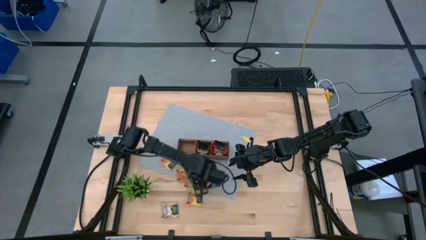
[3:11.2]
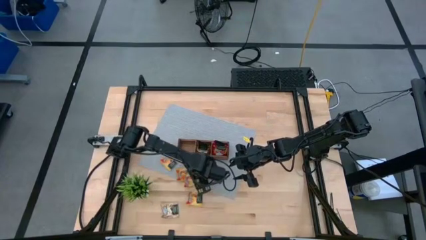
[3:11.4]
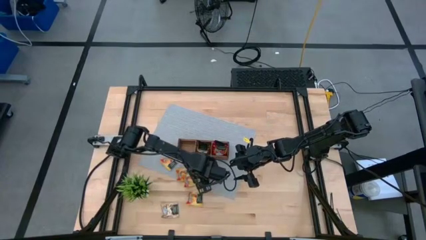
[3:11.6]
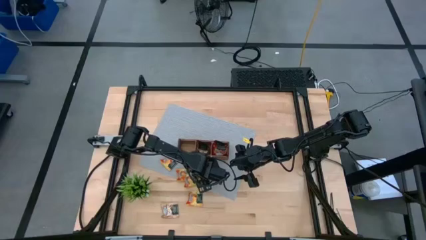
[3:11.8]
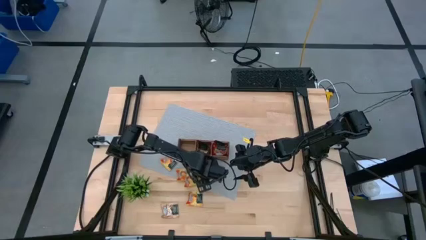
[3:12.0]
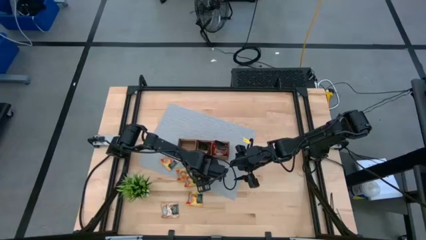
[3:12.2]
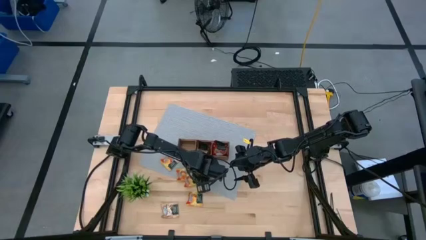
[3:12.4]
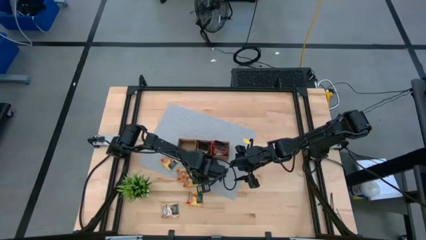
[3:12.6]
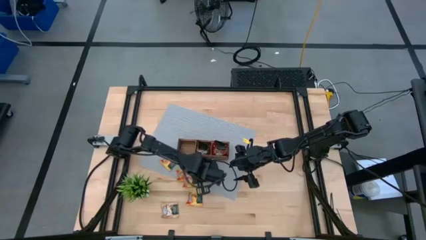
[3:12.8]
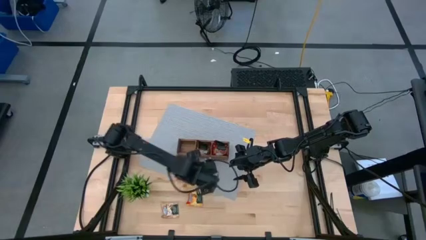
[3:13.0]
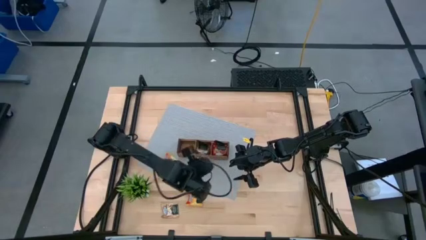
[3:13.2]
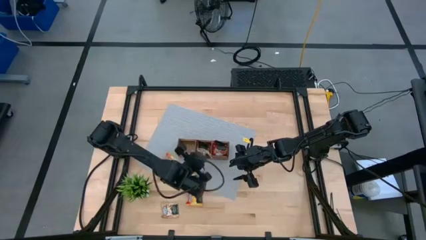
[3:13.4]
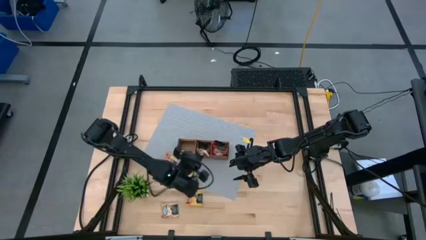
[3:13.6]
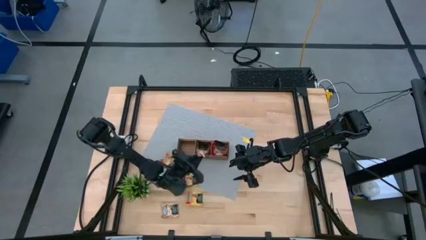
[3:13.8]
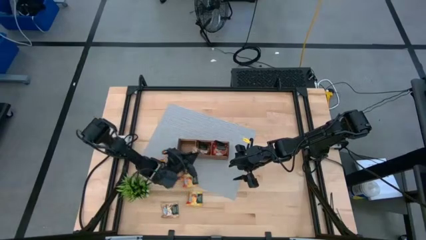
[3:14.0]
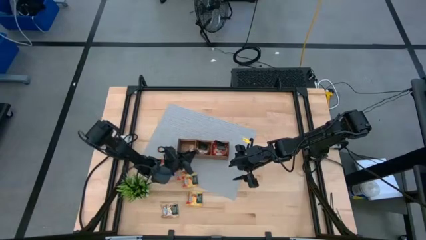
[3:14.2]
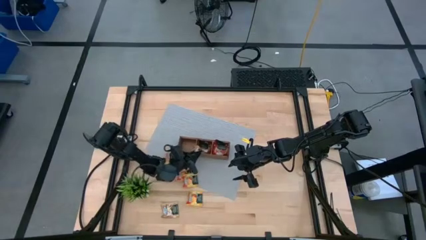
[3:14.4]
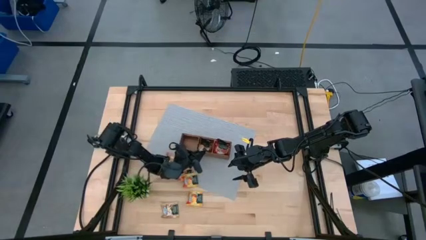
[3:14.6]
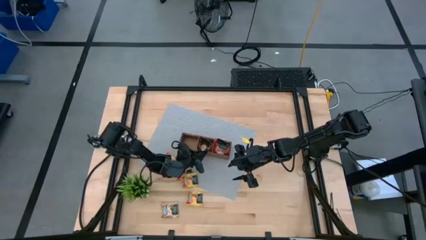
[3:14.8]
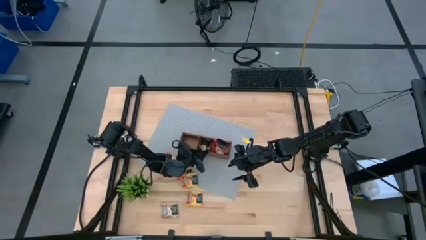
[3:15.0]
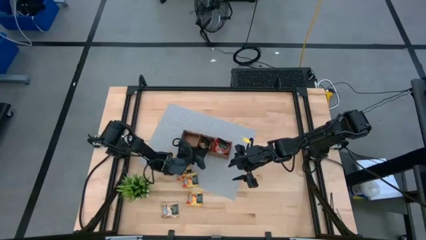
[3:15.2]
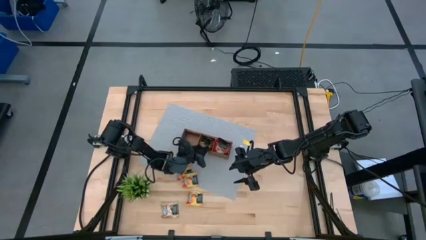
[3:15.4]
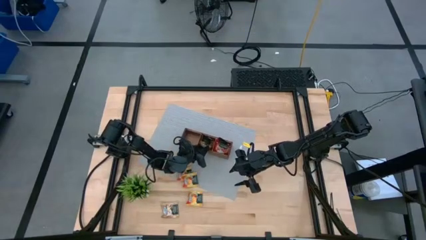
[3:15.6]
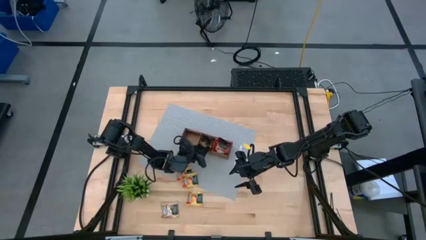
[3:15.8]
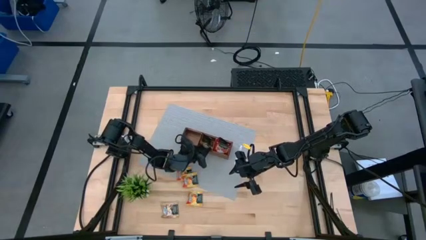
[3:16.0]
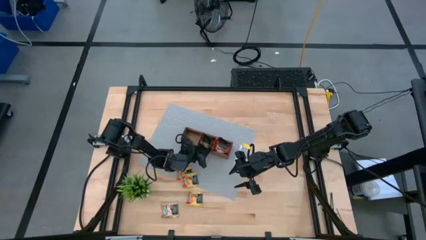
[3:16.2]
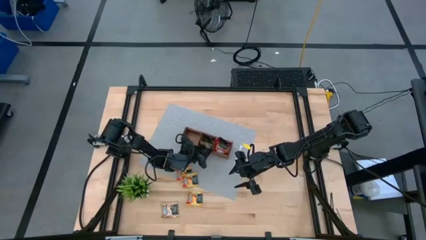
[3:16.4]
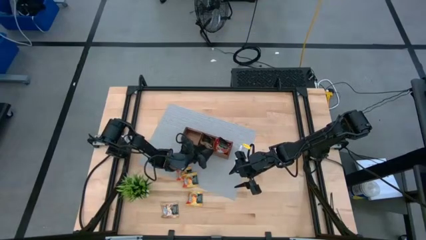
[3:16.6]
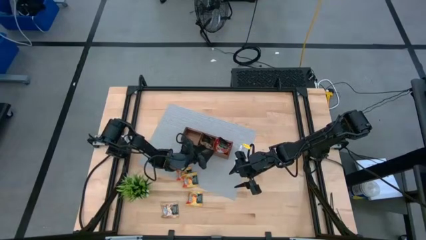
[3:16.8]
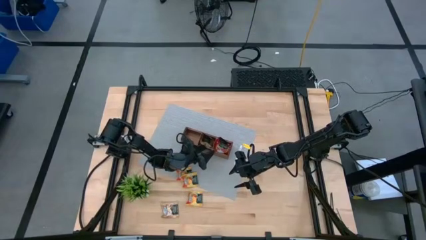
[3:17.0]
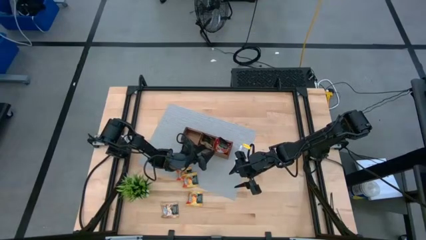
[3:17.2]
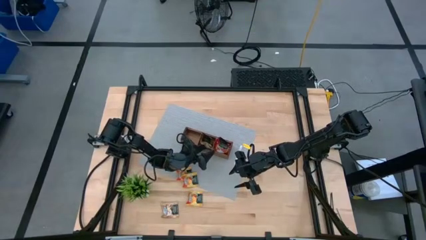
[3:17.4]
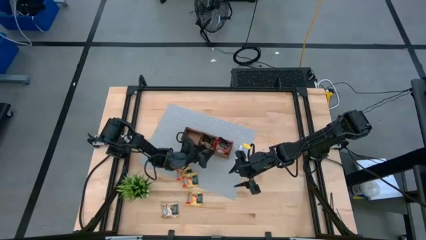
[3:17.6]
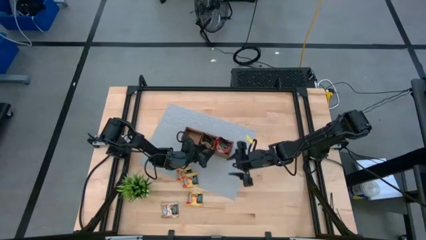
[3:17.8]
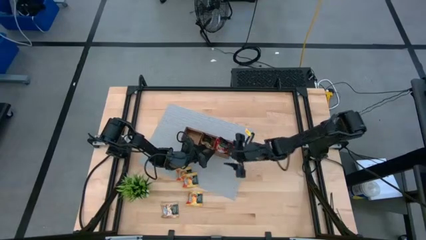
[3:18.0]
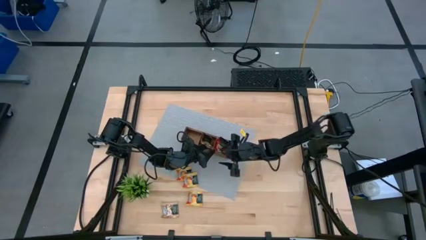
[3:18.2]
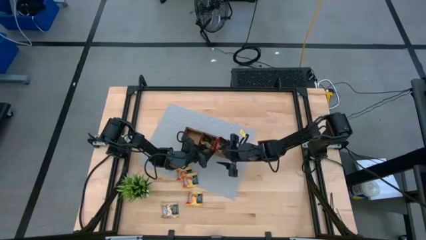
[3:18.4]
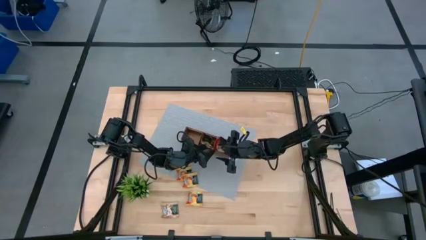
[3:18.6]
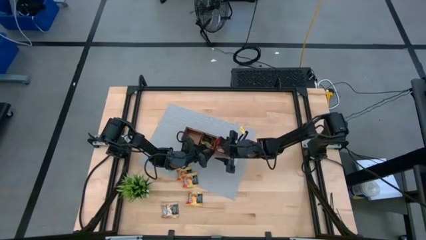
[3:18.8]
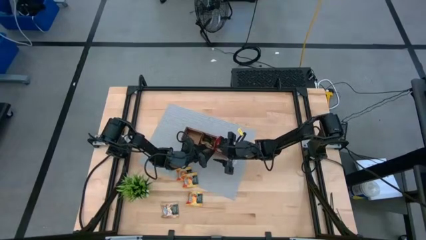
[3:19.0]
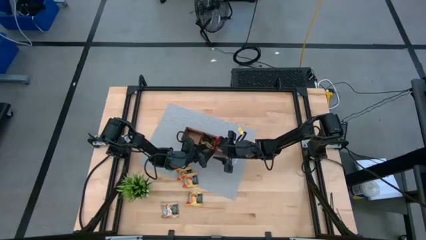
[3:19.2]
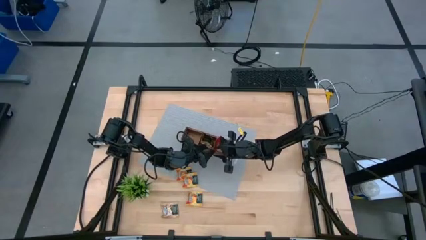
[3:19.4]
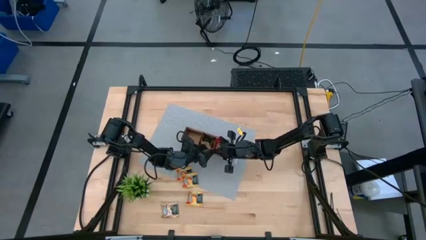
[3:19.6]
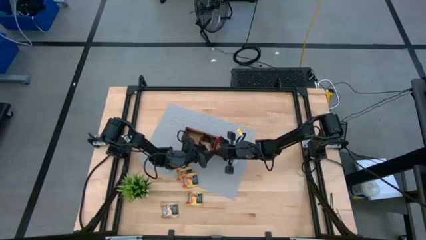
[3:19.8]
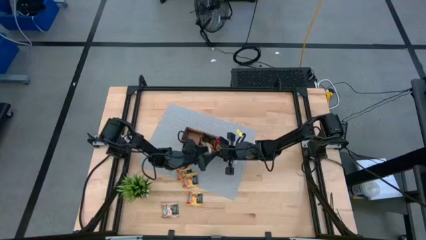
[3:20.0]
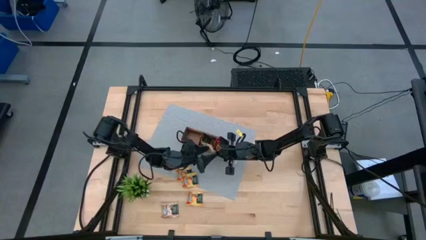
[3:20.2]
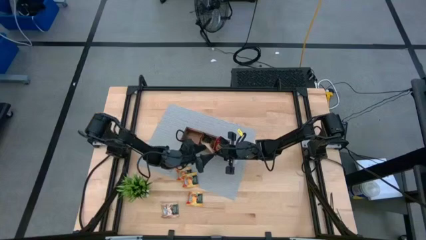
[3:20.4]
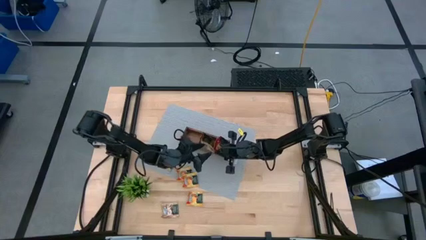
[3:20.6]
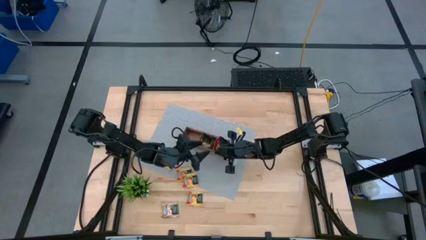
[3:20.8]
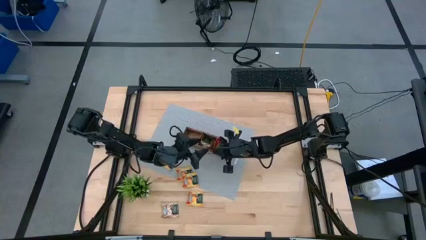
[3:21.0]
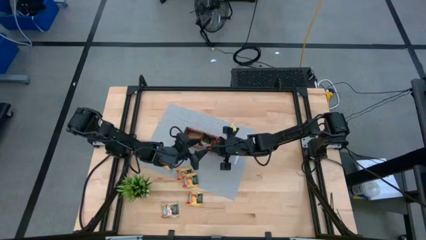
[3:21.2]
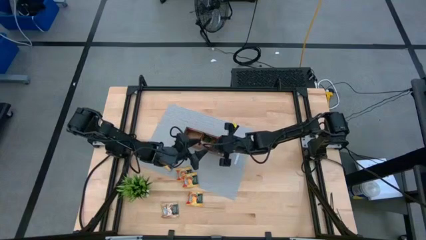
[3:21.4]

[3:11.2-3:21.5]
Task: Pick & Place Tea
Put the brown tea bag into the wooden organizer

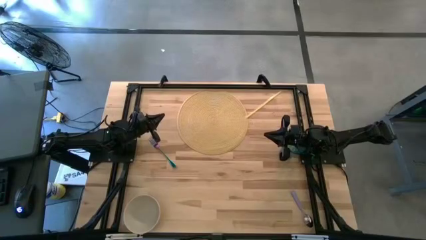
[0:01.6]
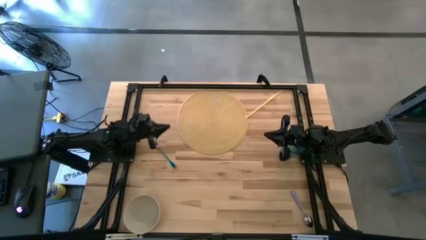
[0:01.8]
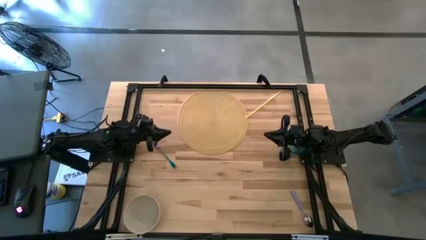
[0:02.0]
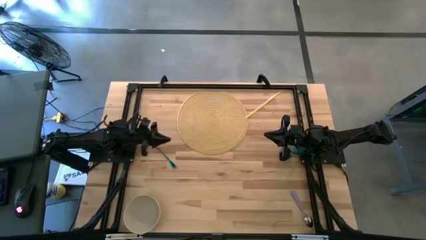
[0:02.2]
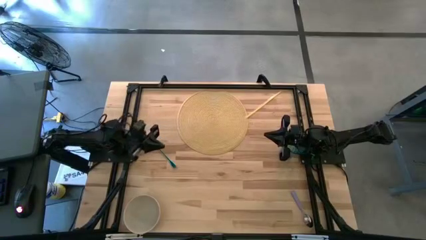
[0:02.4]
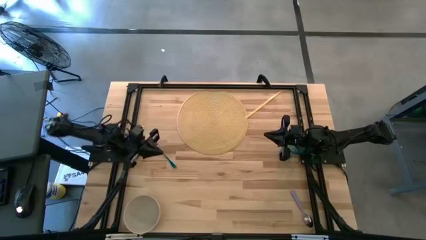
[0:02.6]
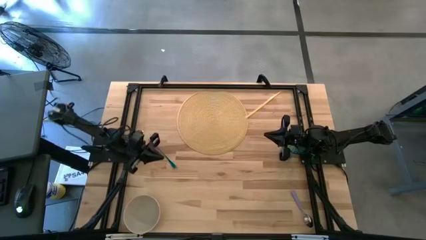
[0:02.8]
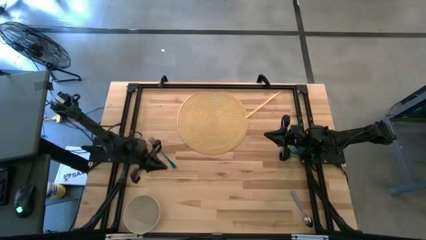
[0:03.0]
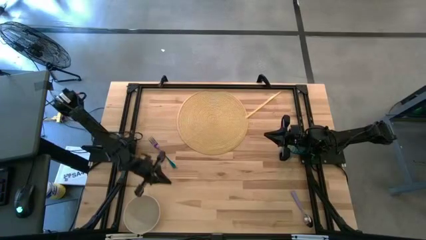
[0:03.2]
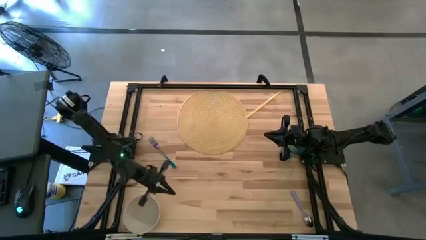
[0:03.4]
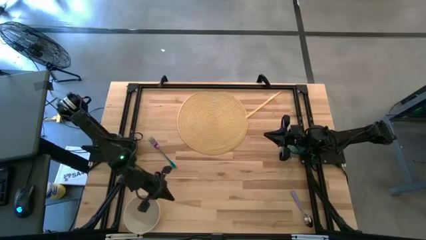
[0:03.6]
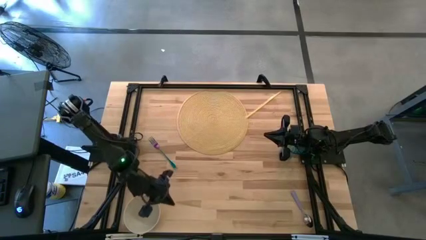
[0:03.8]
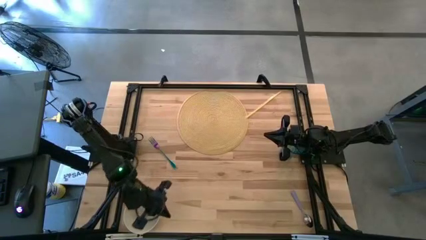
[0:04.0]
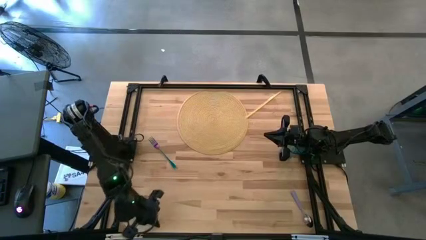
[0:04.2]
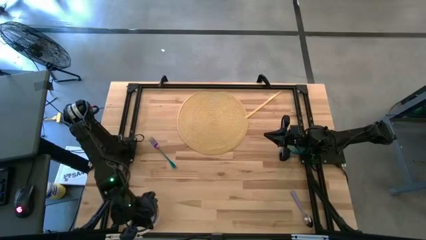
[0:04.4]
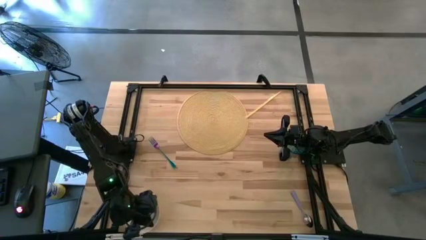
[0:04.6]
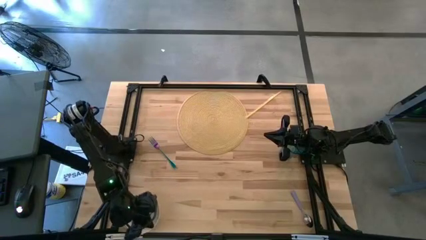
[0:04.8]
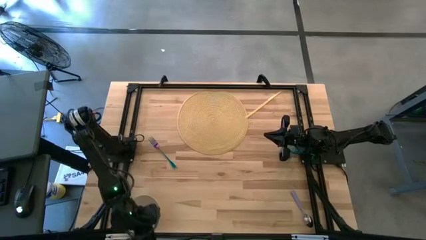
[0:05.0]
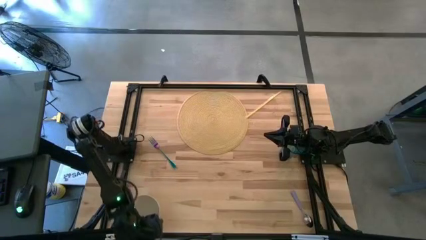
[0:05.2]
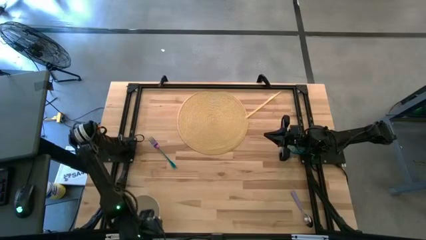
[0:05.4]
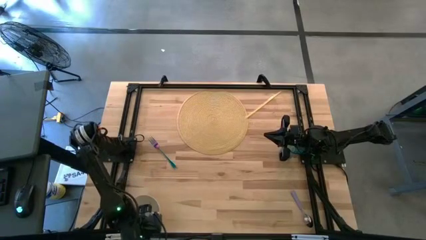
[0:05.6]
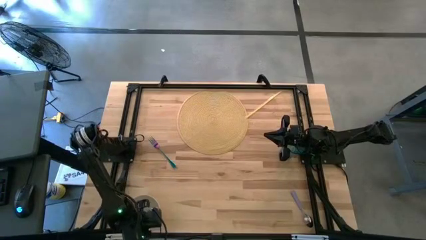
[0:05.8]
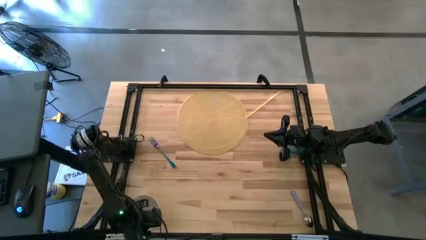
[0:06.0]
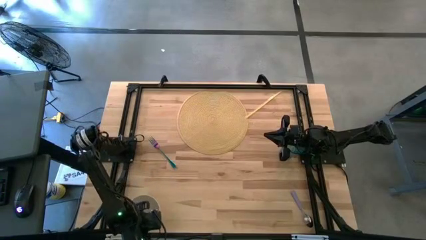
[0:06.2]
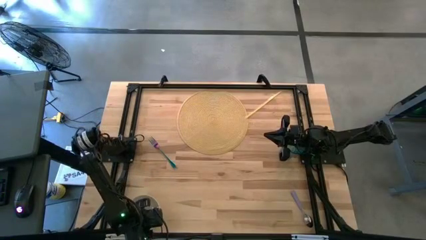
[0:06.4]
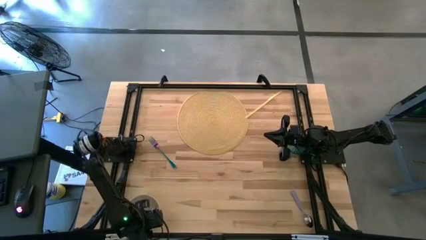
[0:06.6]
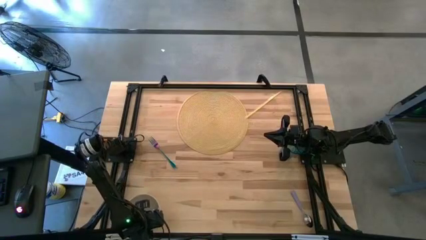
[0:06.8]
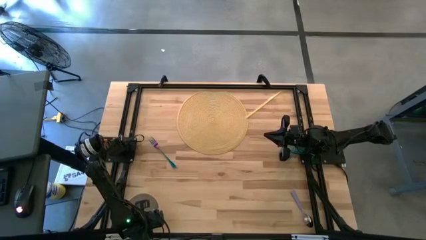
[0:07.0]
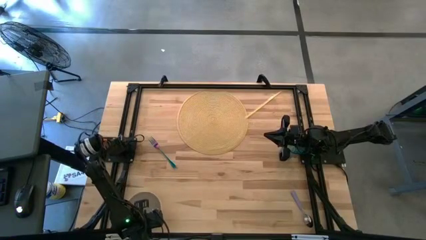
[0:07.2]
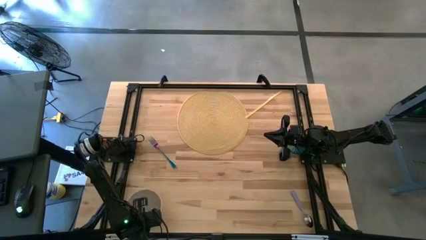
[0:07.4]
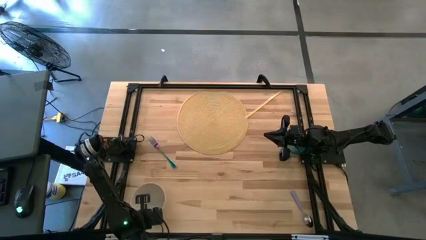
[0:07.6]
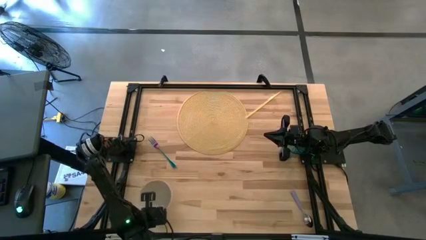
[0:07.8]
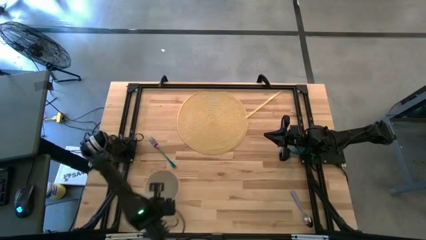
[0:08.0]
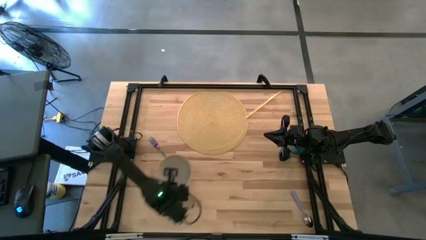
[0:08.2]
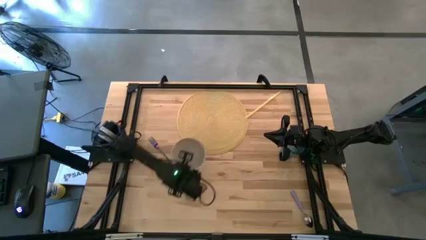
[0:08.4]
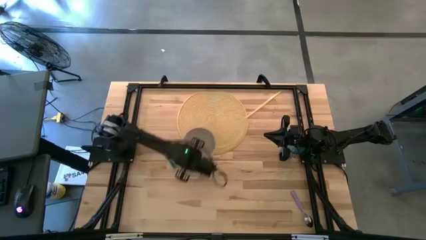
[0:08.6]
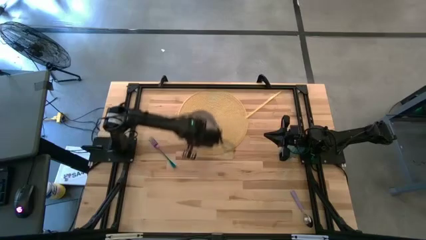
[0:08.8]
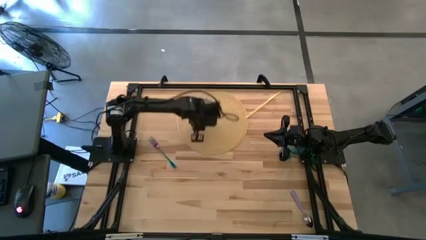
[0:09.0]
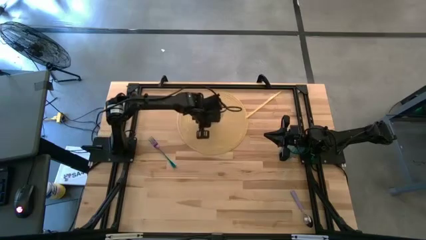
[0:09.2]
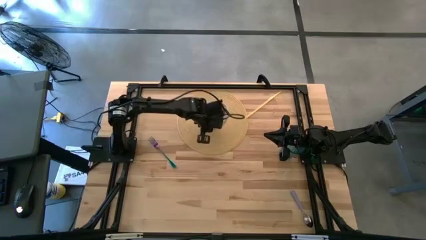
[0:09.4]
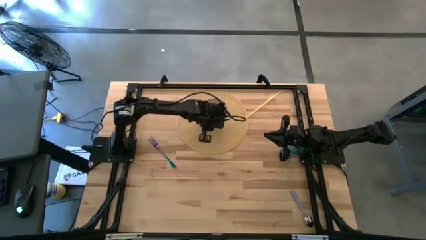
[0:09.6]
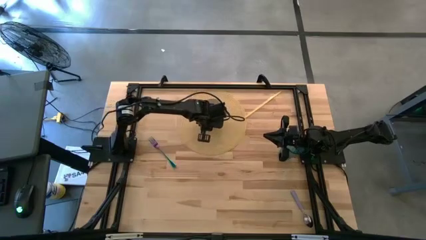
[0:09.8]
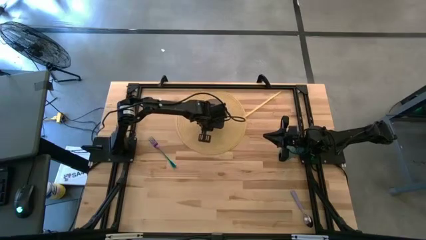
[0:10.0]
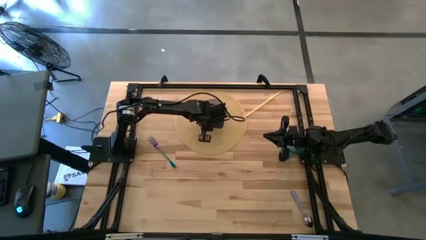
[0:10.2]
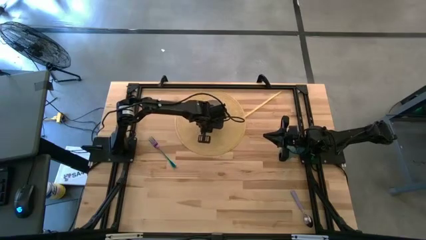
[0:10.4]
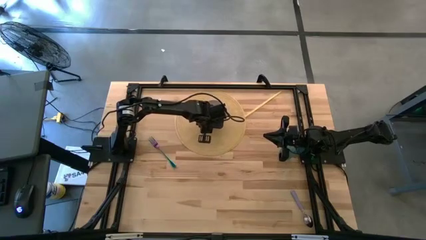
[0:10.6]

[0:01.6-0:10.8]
Task: Pick & Place Utensil
Put the white bowl on the brown mat
